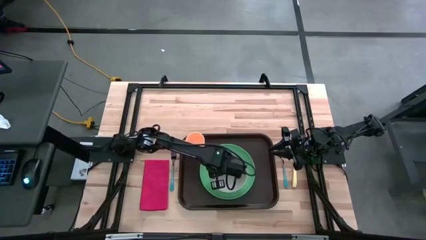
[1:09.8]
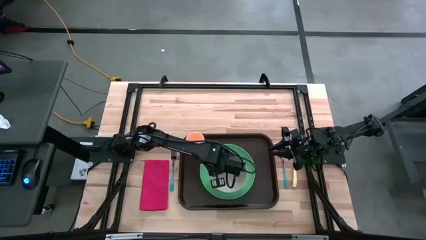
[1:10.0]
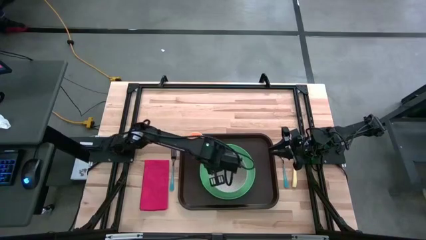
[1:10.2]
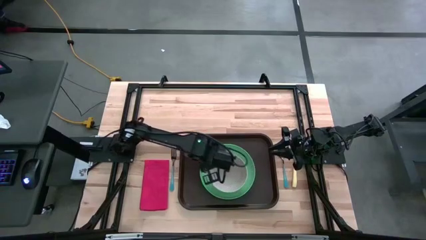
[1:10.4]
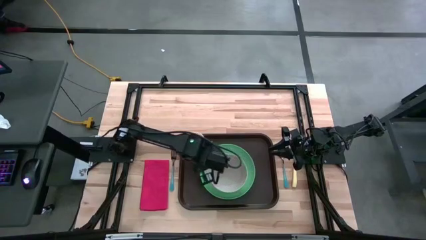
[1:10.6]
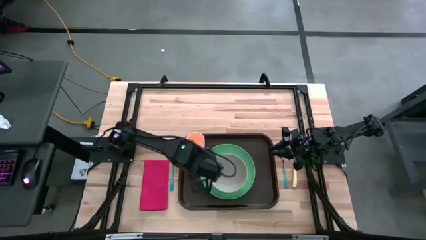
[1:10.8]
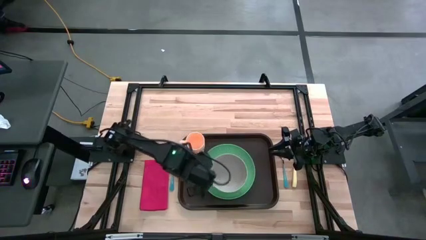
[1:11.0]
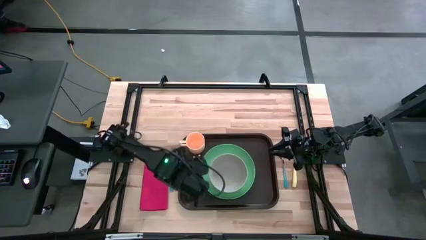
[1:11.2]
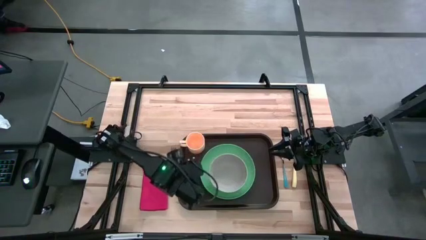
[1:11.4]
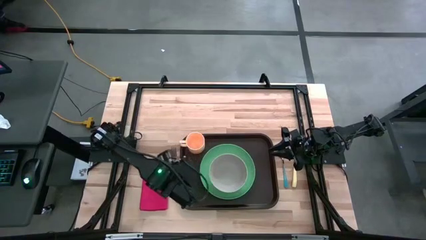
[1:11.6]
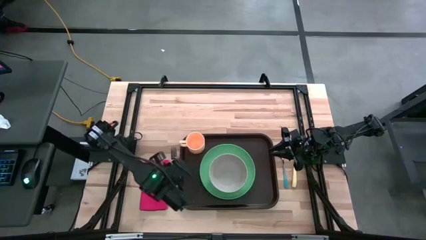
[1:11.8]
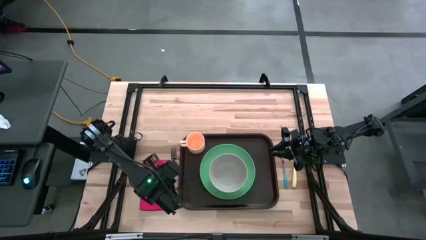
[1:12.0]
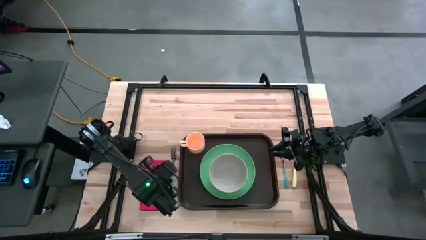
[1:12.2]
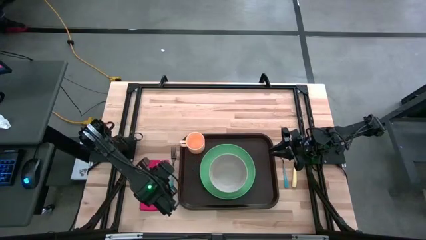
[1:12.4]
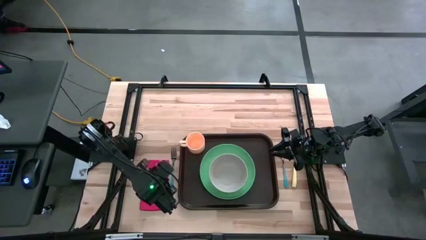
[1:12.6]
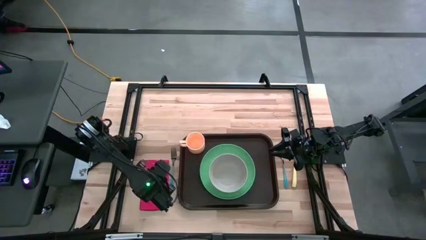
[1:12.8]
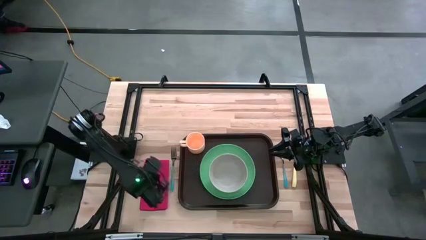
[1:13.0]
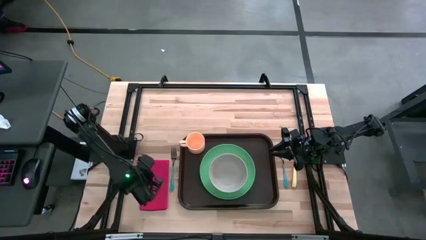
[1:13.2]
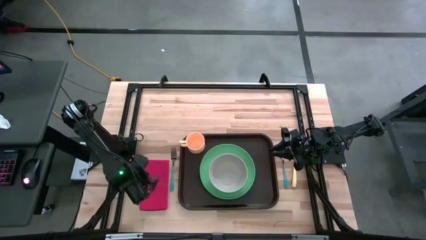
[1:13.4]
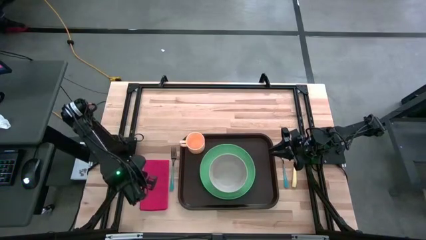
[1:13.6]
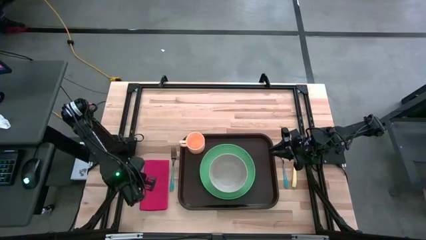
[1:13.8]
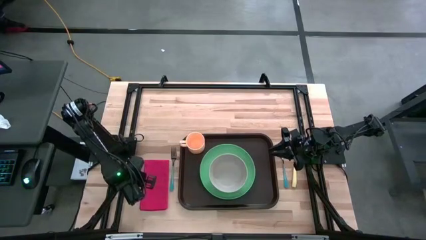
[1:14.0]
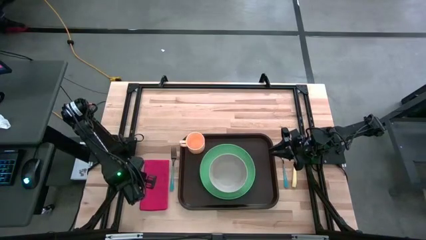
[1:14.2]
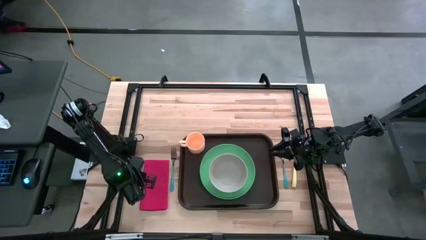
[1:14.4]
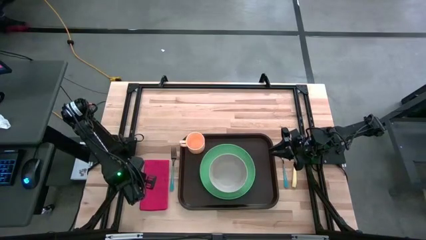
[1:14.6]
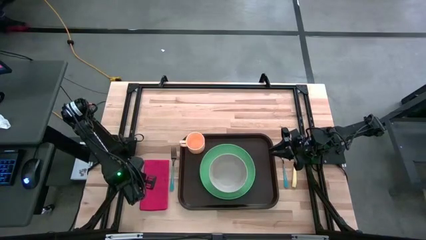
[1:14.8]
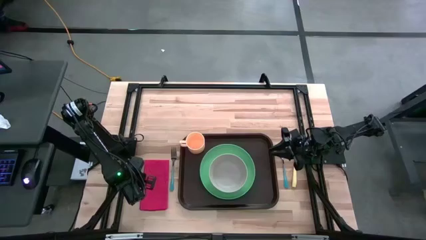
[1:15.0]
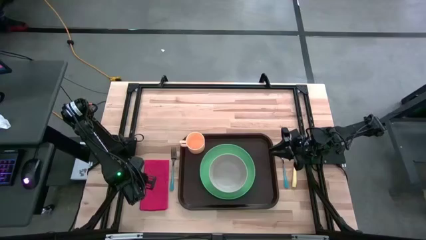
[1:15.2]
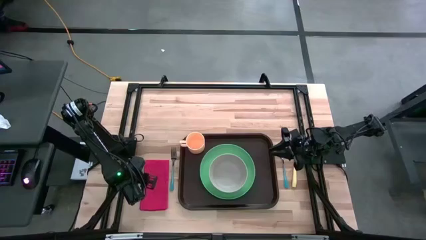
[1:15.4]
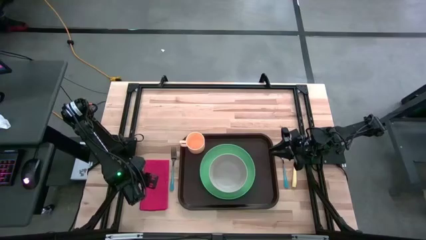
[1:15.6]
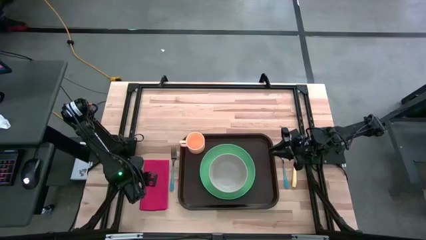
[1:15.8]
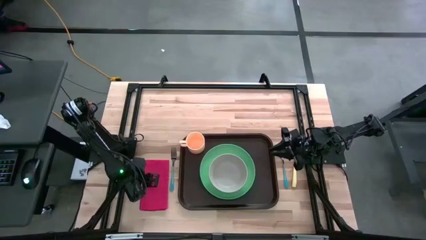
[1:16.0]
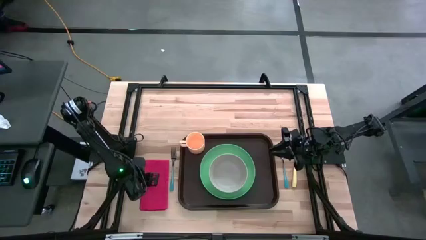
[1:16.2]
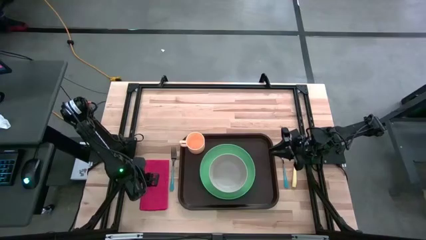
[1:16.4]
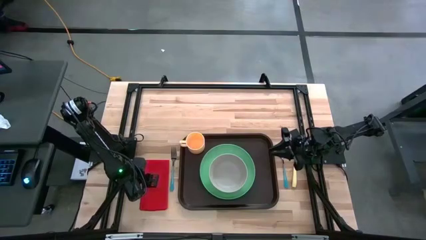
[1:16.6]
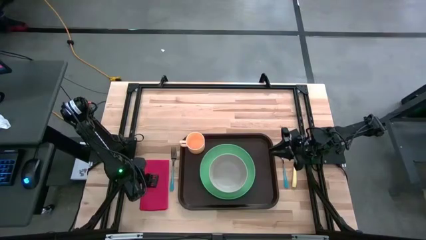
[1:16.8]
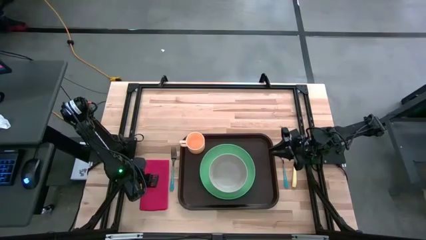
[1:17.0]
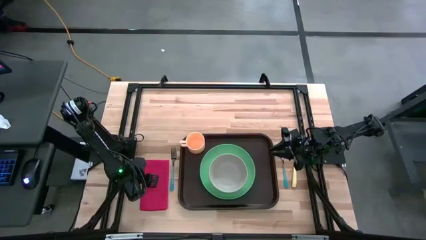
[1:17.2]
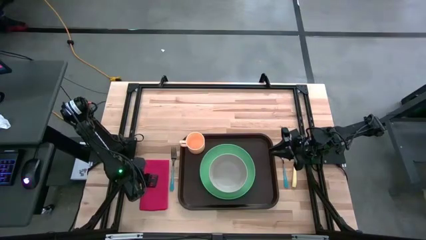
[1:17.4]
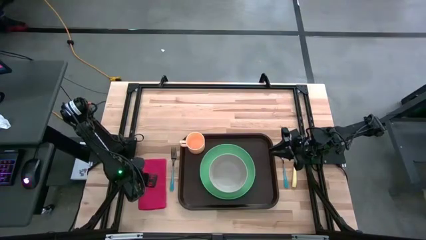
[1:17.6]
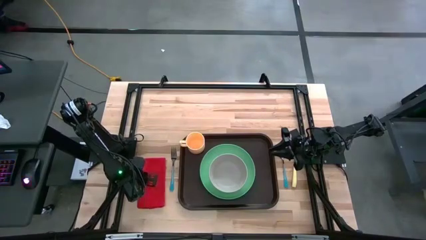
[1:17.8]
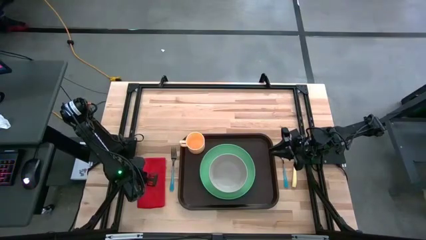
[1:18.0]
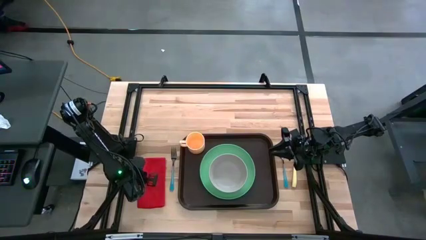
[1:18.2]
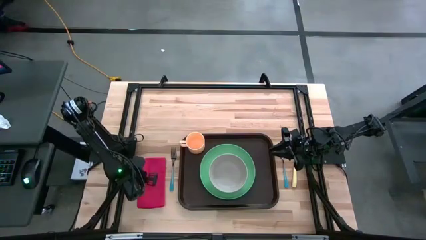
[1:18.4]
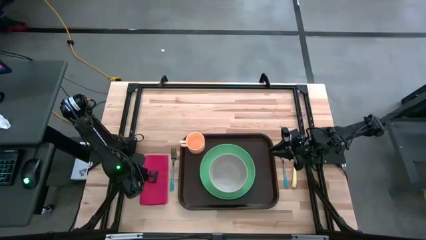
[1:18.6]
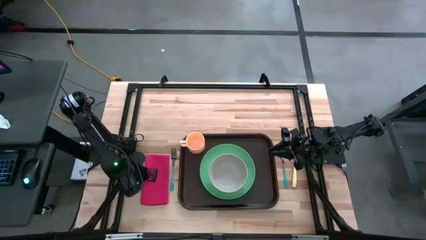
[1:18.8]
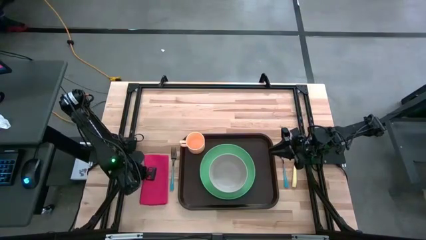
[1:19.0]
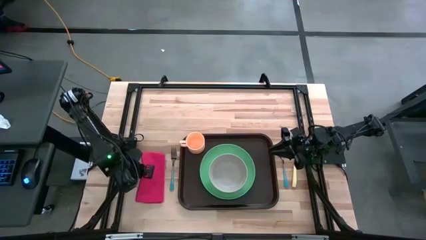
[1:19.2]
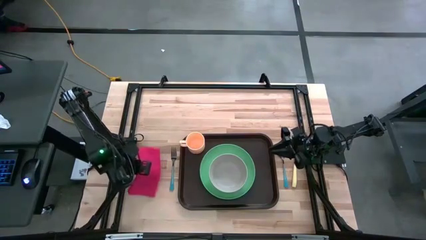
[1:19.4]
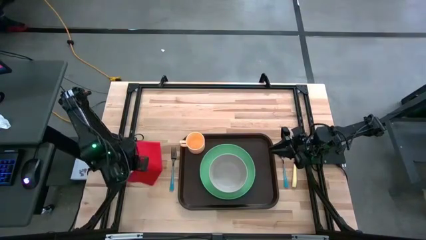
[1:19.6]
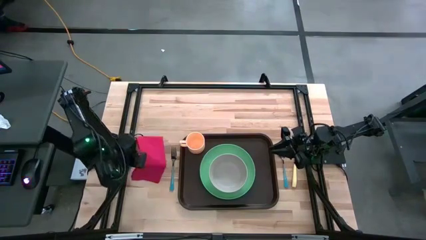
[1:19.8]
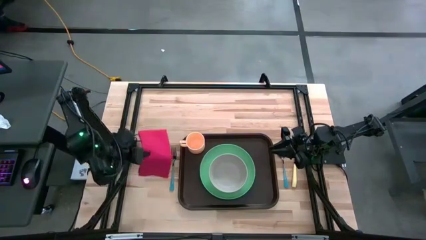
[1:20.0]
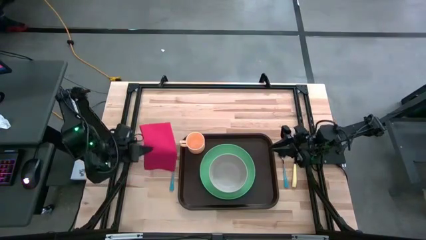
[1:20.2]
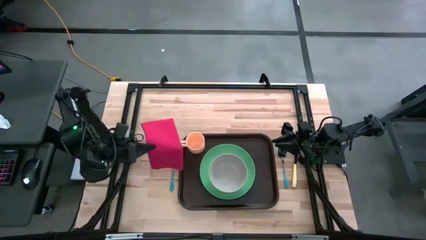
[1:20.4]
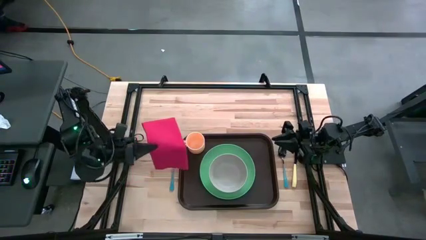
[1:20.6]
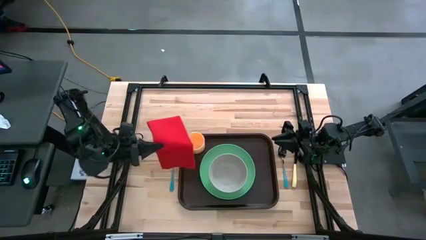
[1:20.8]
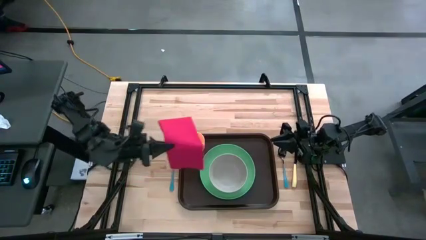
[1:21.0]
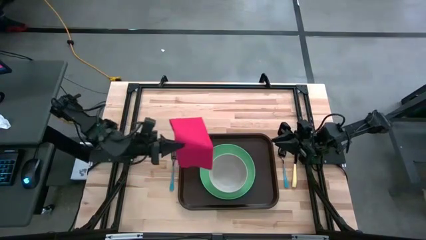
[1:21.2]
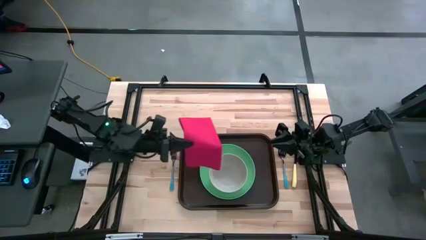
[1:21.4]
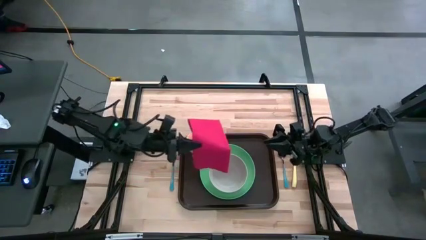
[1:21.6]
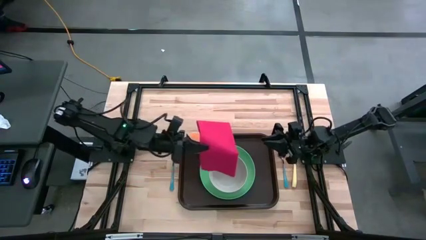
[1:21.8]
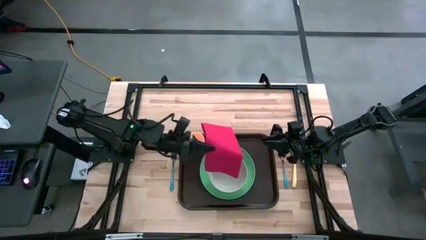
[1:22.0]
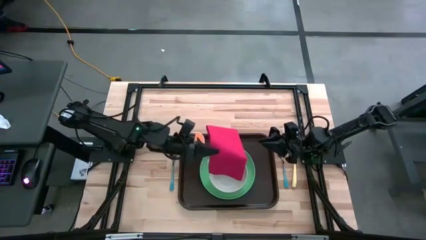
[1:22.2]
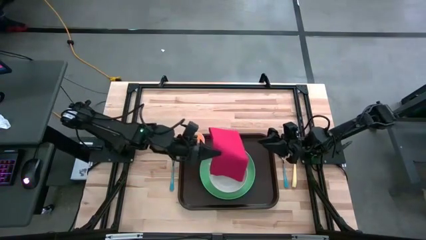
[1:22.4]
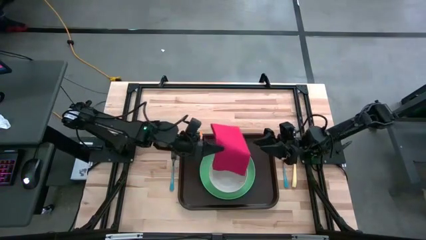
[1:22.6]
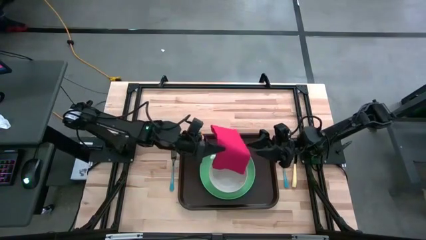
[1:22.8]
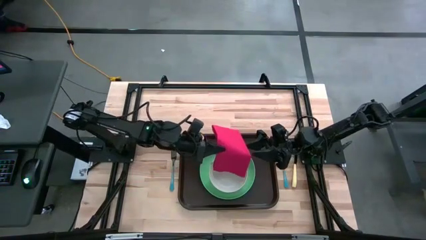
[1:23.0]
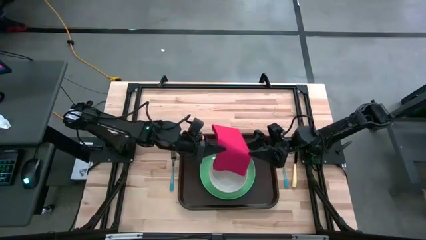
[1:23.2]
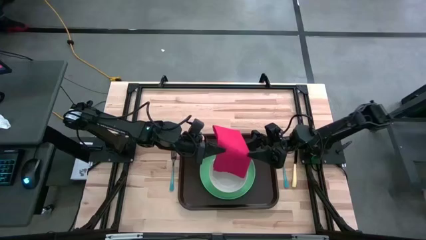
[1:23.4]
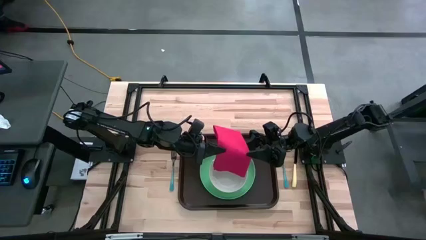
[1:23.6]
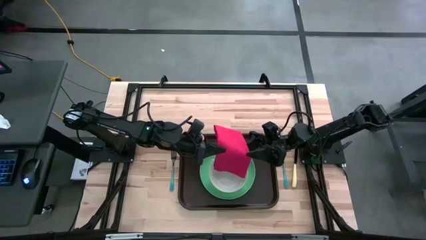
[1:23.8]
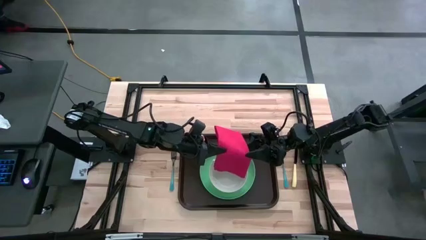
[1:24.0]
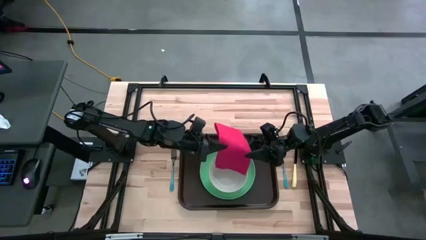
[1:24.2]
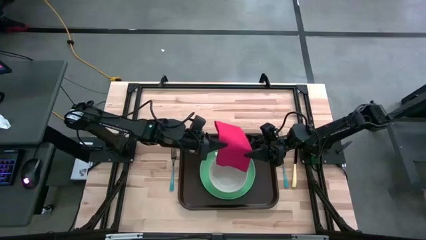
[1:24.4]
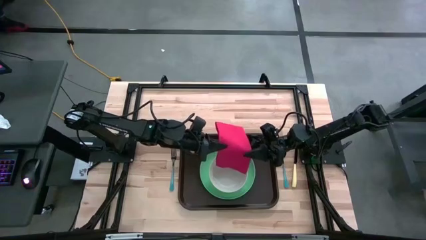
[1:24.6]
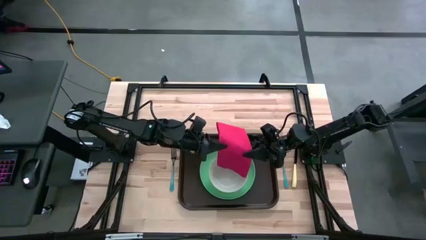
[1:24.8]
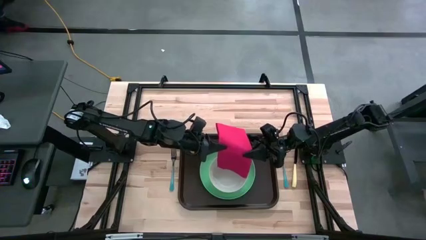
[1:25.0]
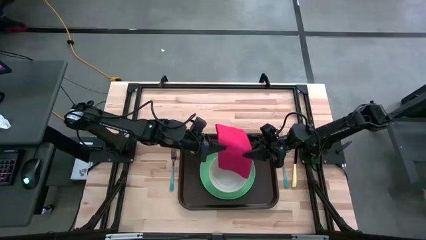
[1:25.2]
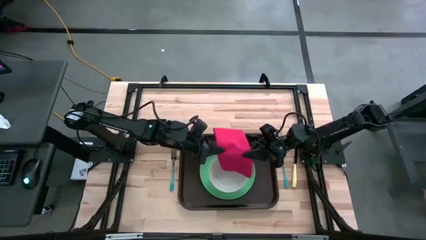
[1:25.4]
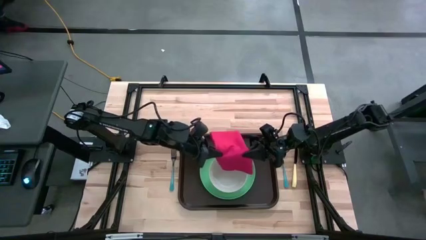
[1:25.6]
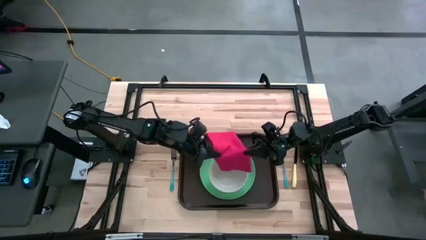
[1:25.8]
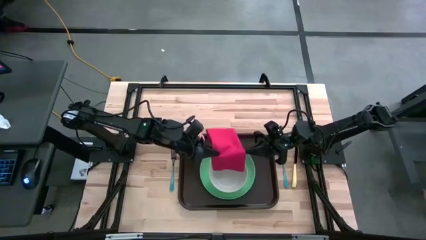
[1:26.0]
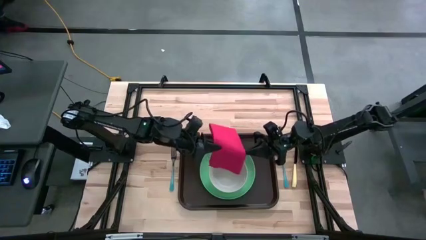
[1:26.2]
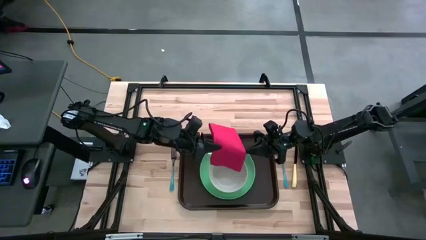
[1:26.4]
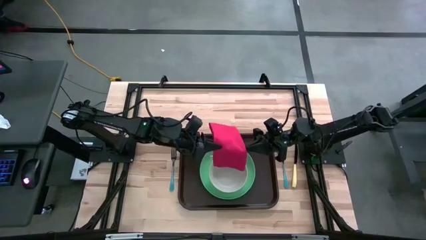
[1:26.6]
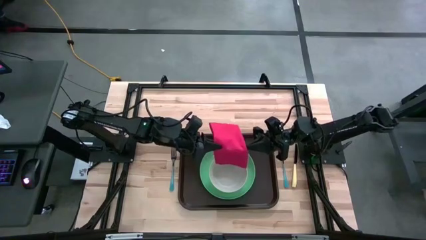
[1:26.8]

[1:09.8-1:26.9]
Task: Set up tray
Put the red table napkin beside the plate on the brown serving tray
